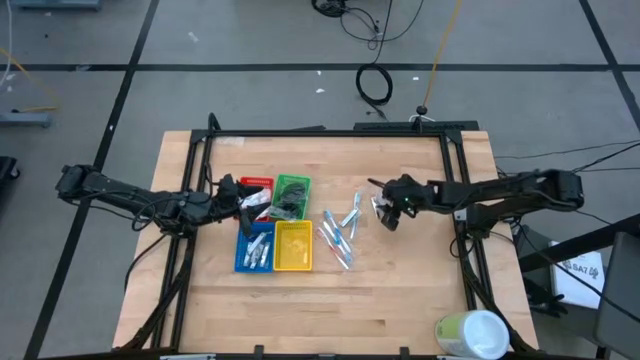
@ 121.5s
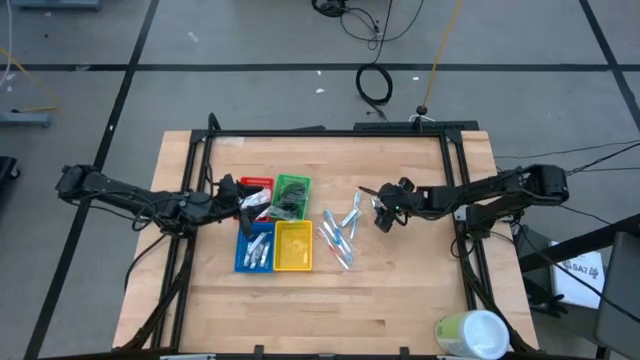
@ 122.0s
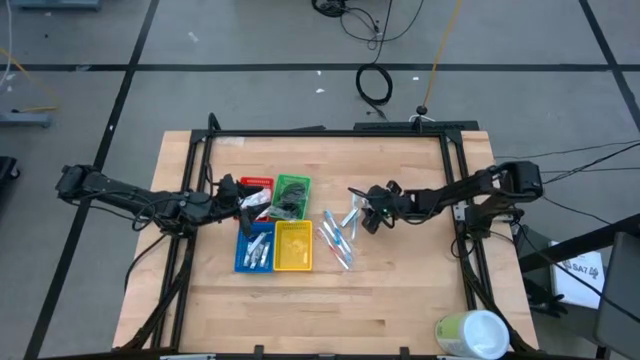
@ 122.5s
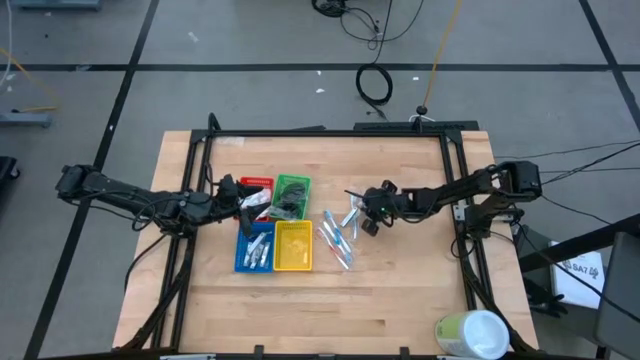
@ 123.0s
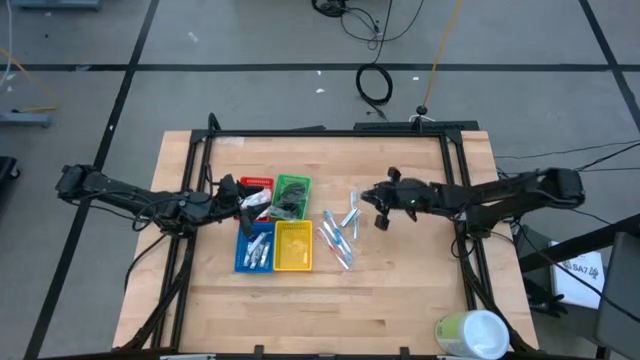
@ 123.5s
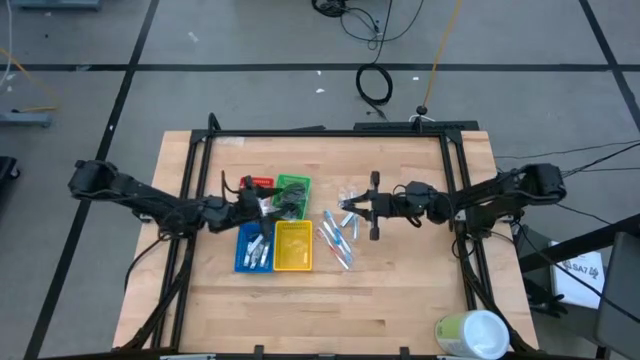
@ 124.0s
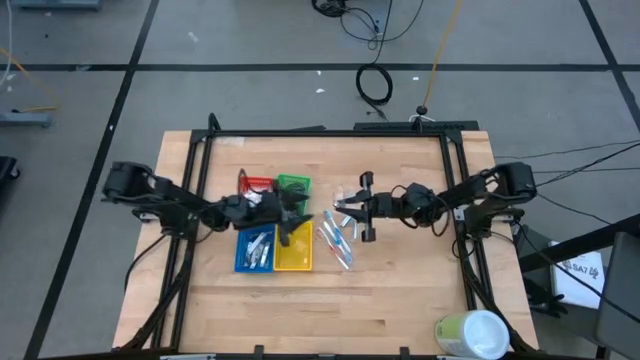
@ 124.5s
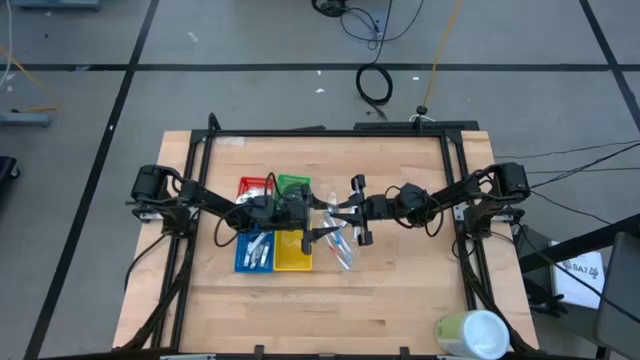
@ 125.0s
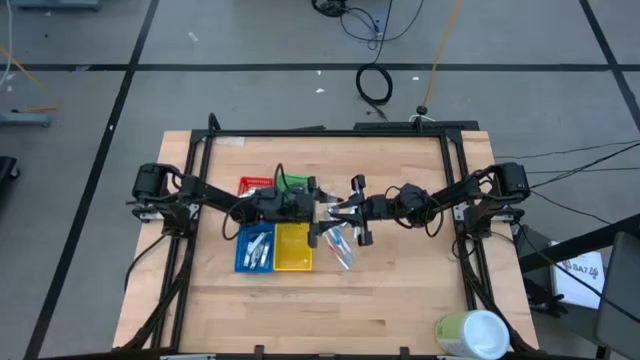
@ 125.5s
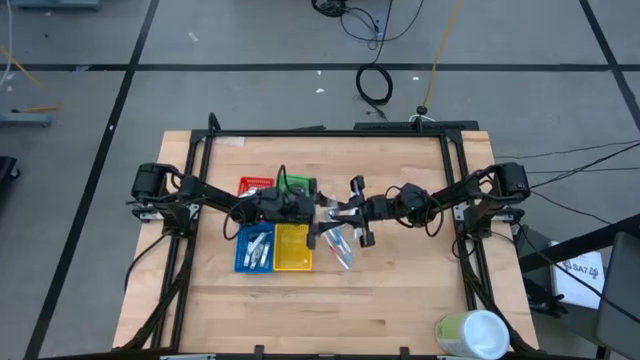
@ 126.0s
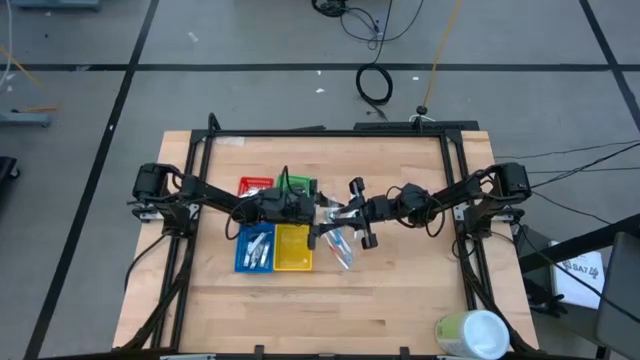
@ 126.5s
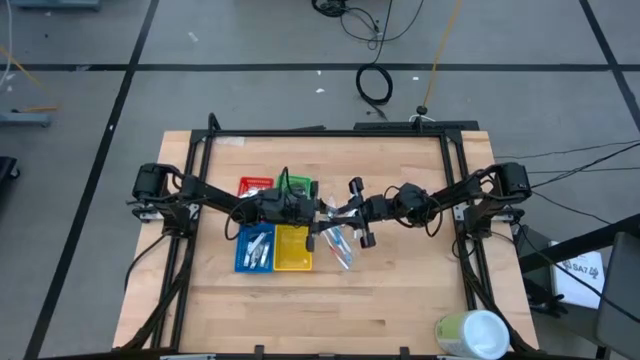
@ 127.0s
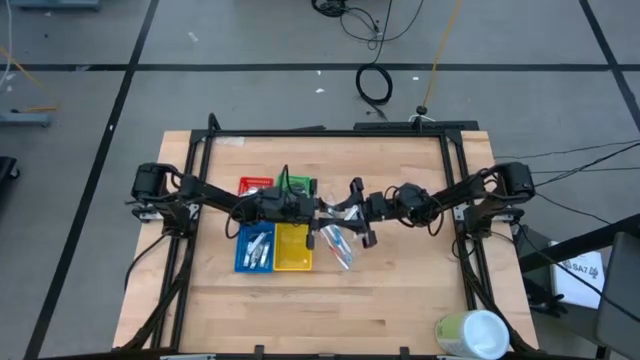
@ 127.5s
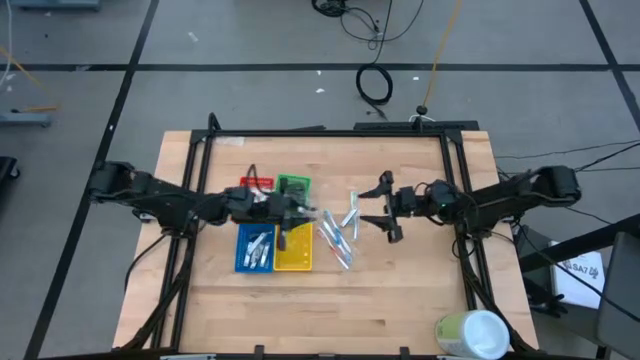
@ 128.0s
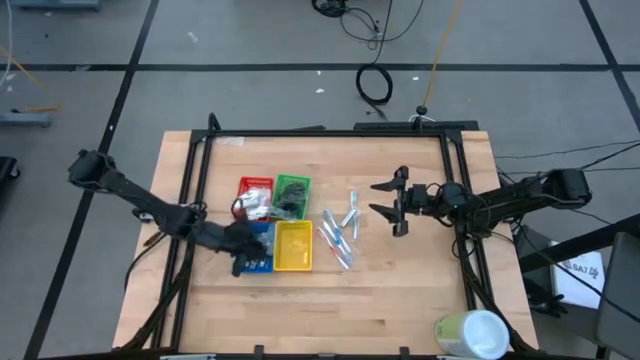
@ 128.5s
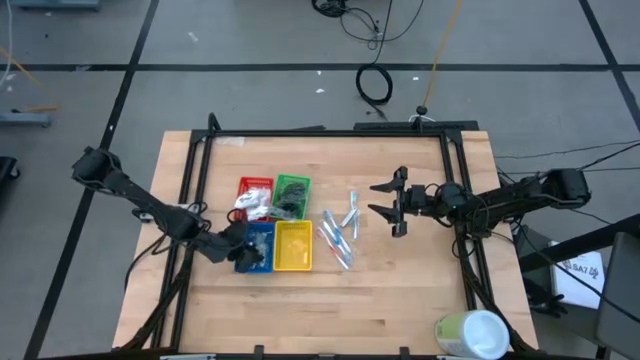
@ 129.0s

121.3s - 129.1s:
Task: Pick & Place Travel size toiletries
Put the silver nail cutter into the blue bin

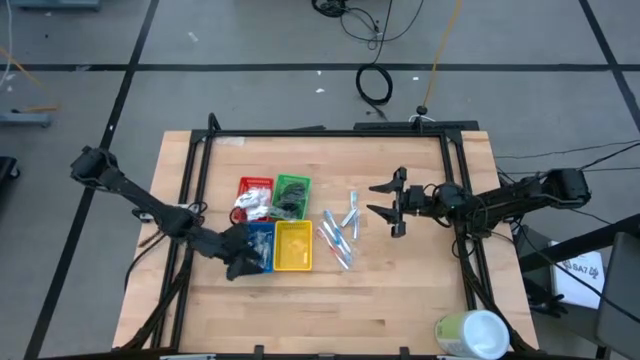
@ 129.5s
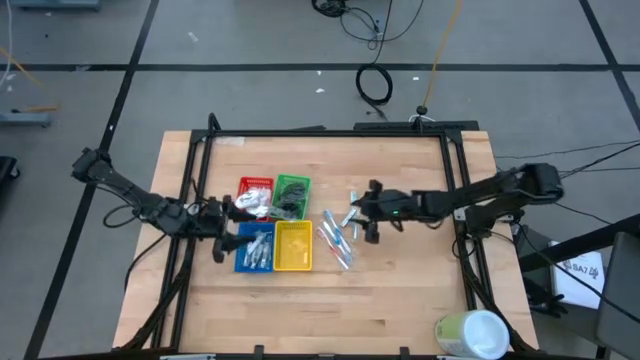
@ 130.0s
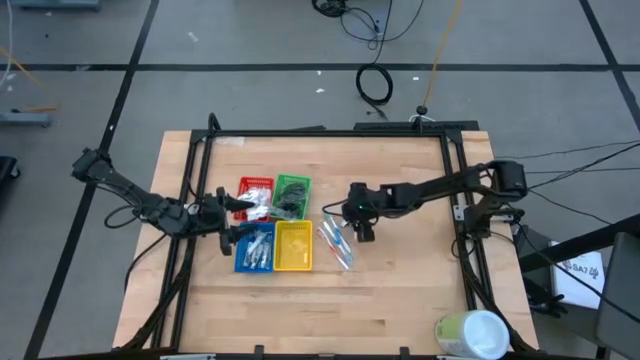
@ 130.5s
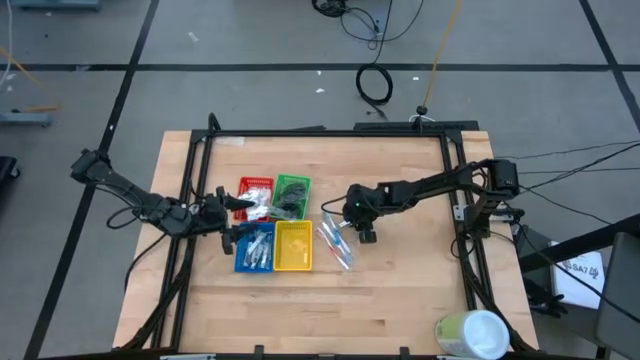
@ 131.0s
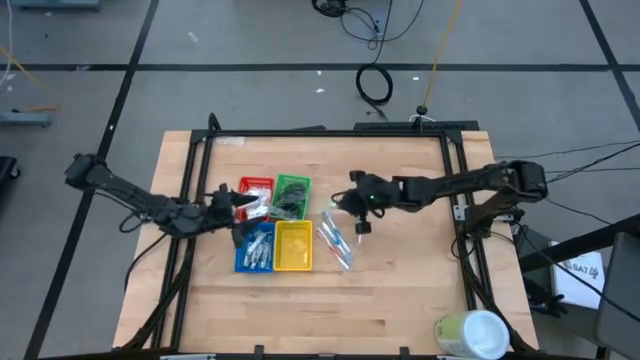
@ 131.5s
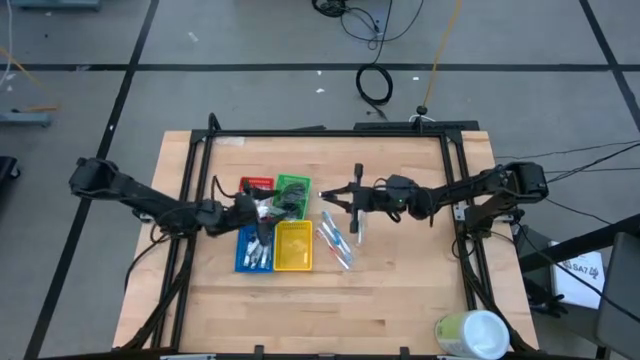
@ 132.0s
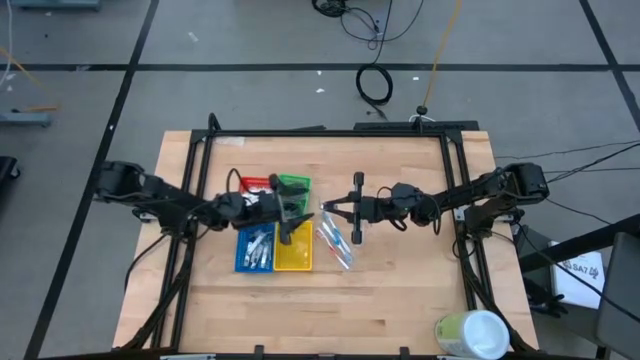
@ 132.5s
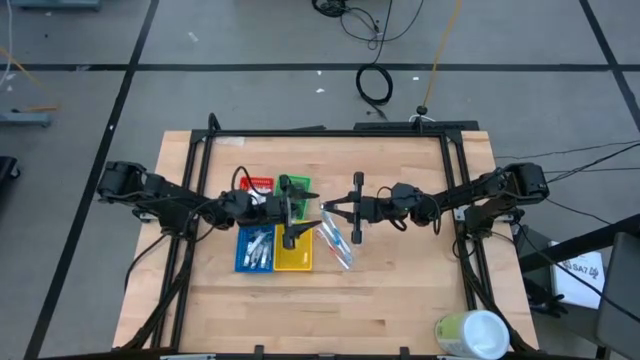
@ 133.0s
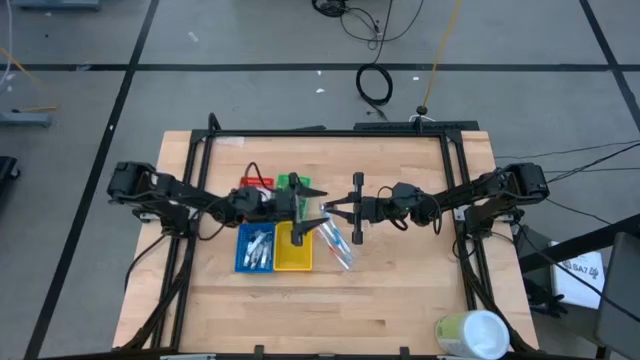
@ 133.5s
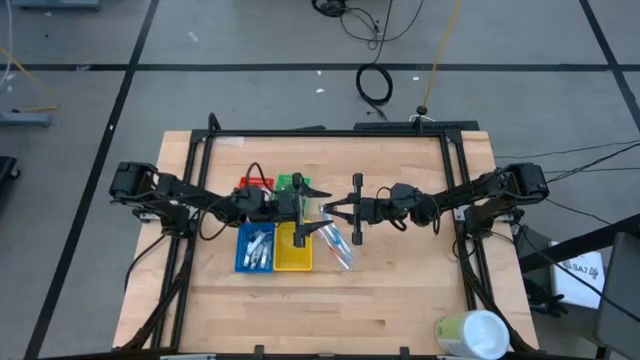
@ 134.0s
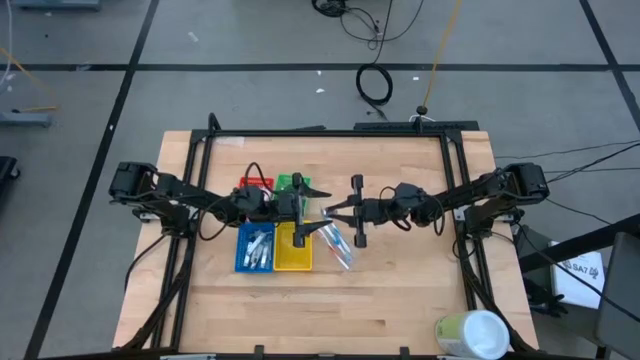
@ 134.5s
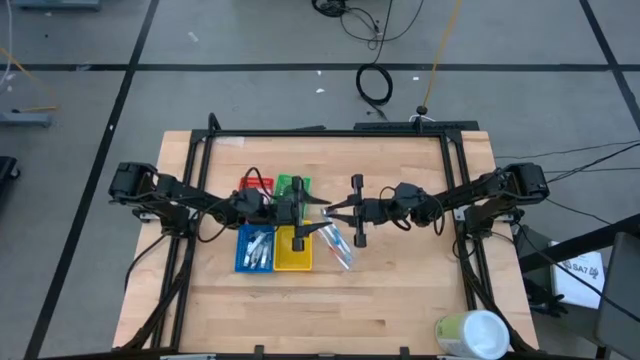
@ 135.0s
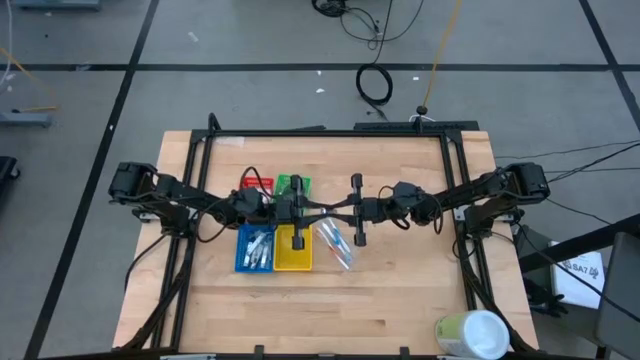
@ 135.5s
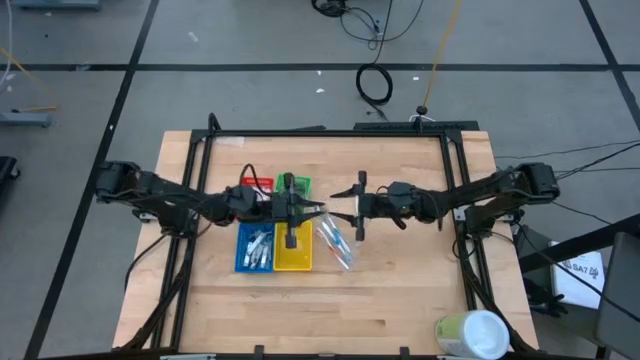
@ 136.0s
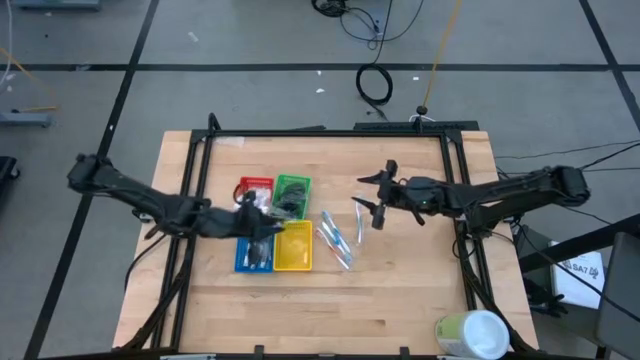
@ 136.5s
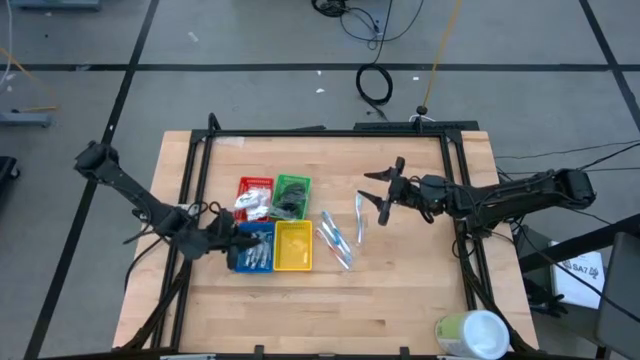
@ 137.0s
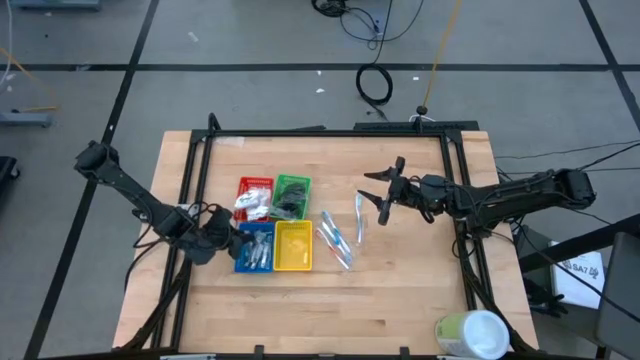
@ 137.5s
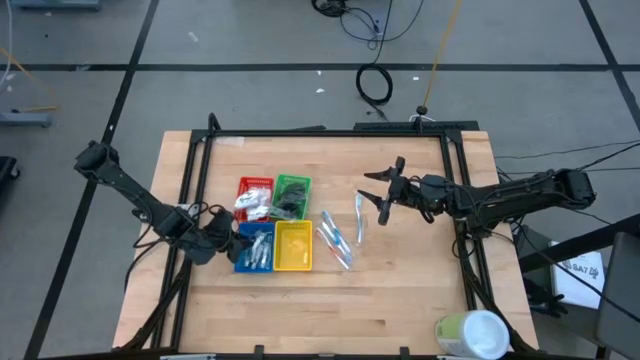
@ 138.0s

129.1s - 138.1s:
Put the silver nail cutter into the blue bin

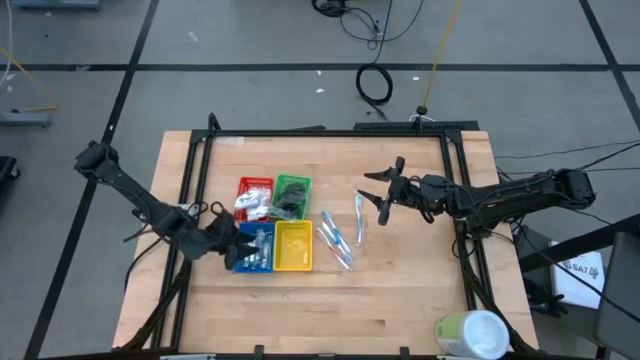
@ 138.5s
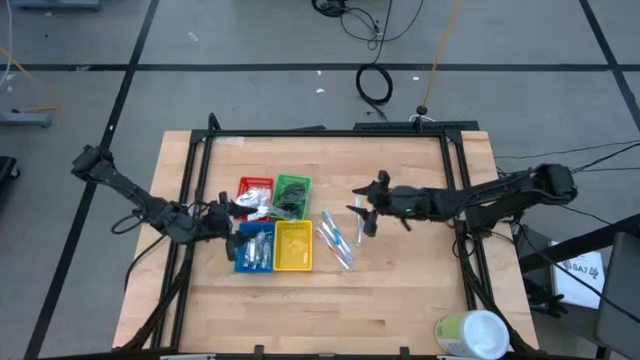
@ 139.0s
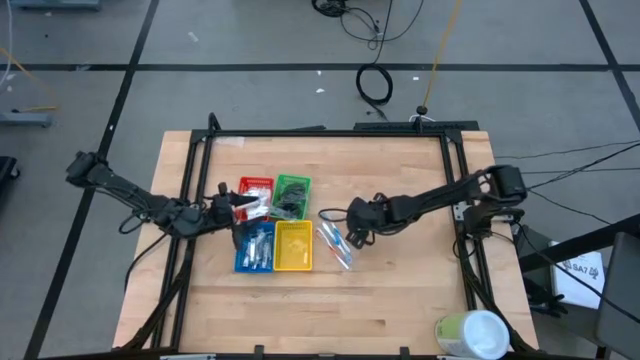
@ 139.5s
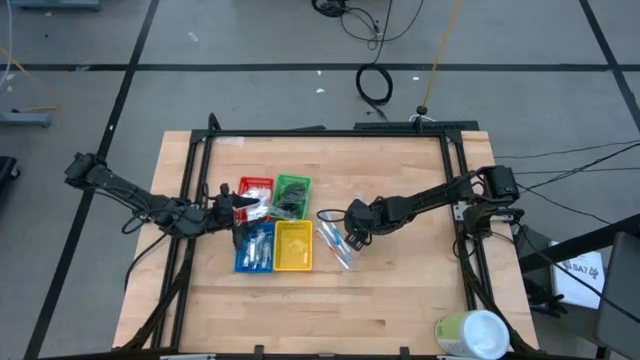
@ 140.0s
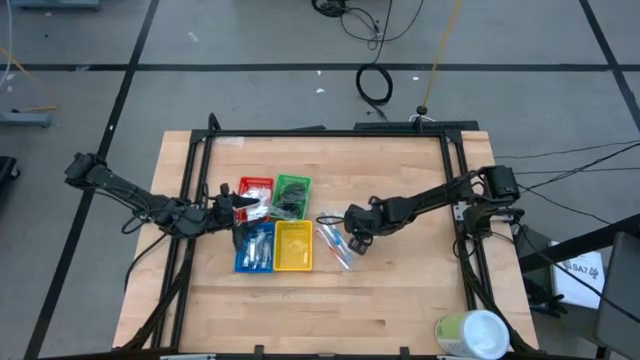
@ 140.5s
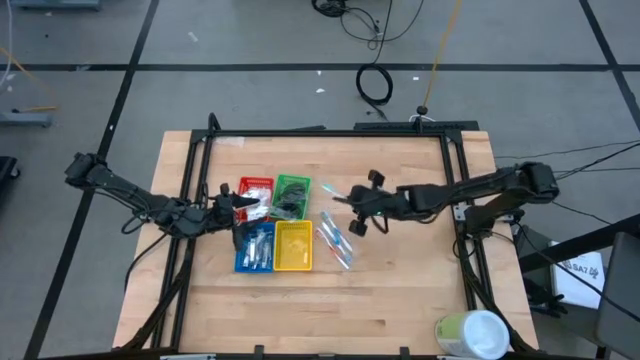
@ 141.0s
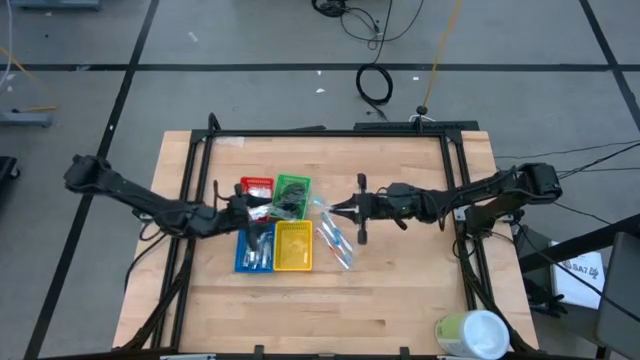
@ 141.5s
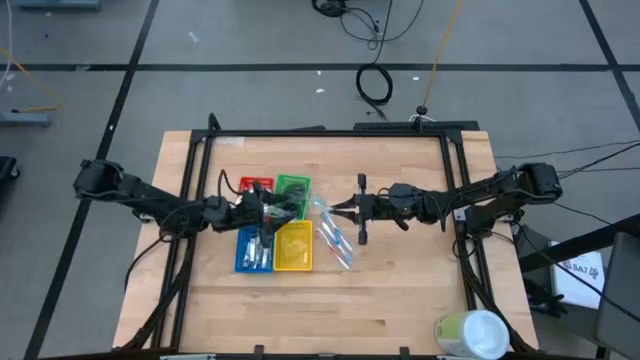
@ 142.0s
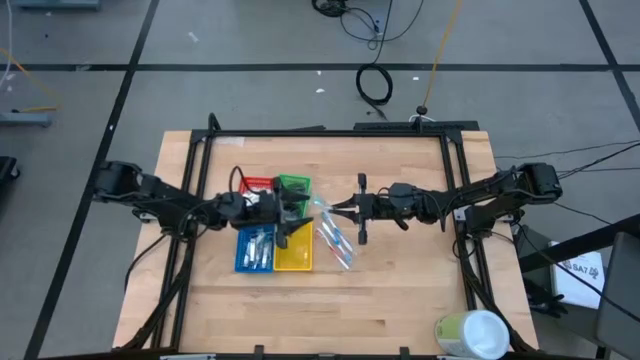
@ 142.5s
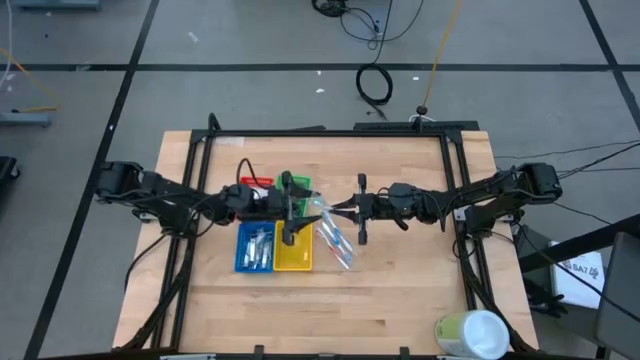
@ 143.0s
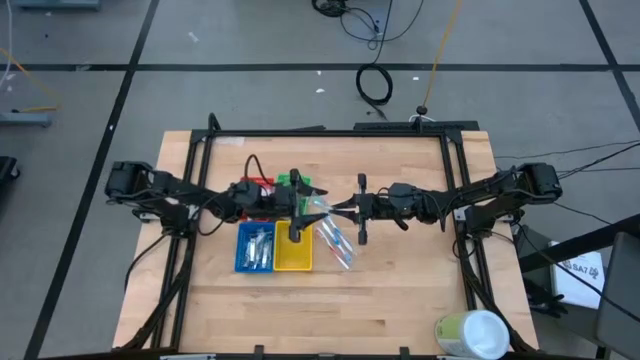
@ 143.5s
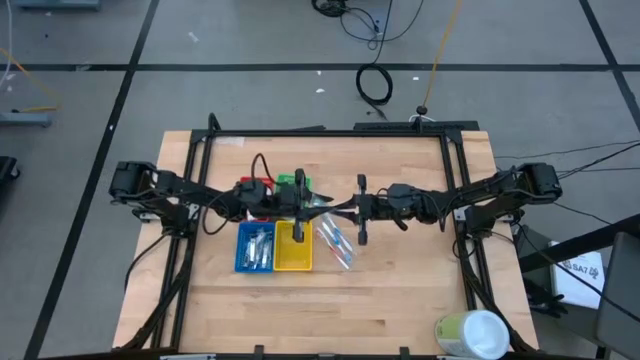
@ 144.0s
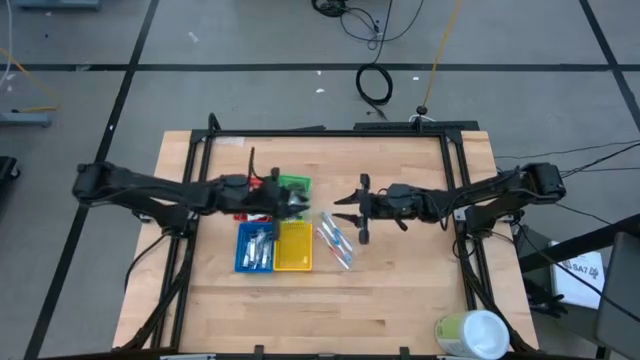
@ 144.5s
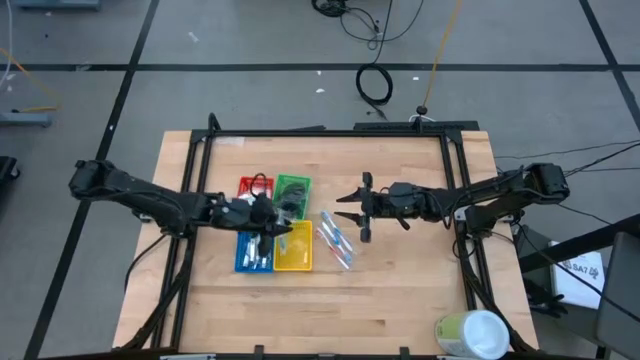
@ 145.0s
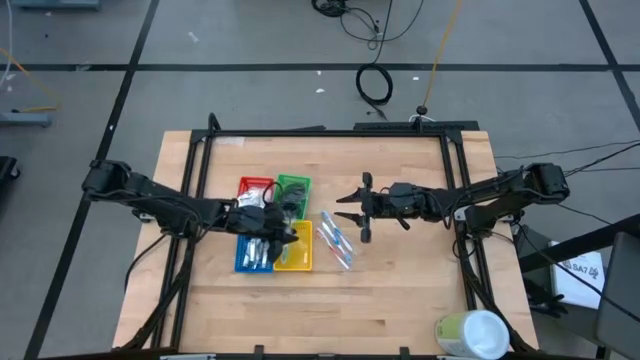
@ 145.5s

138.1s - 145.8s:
Put the green toothbrush into the yellow bin
